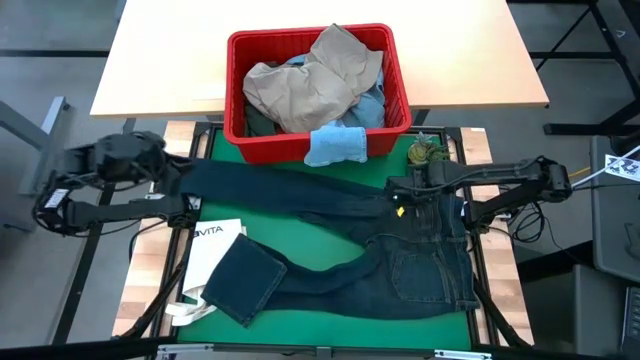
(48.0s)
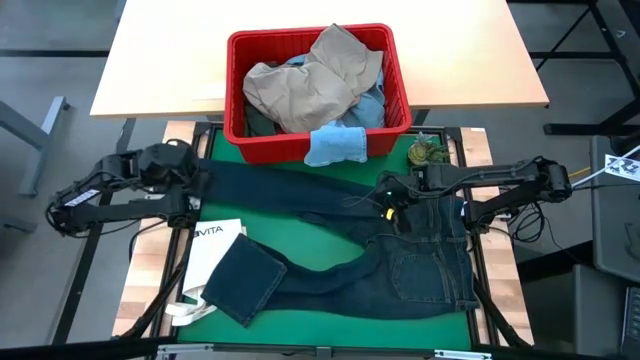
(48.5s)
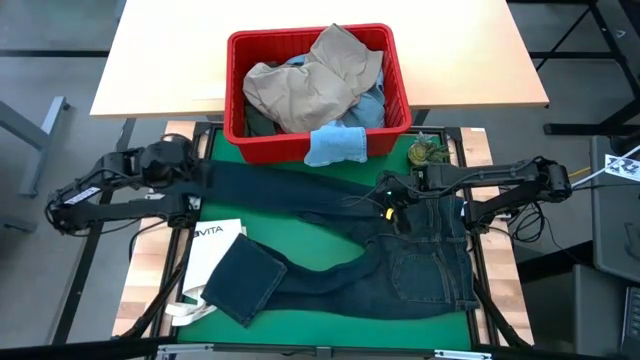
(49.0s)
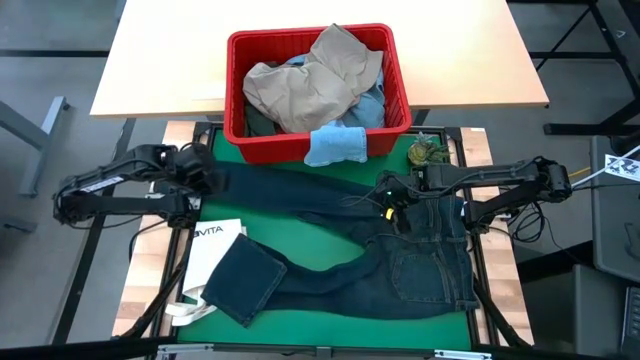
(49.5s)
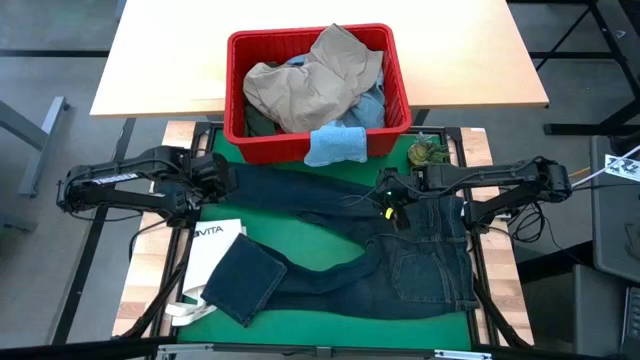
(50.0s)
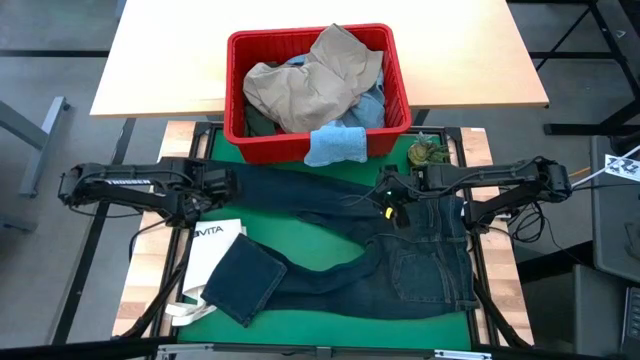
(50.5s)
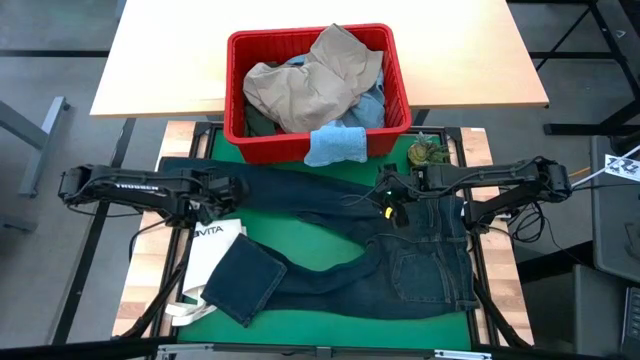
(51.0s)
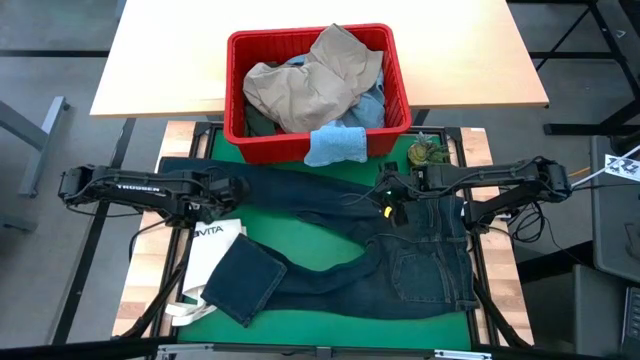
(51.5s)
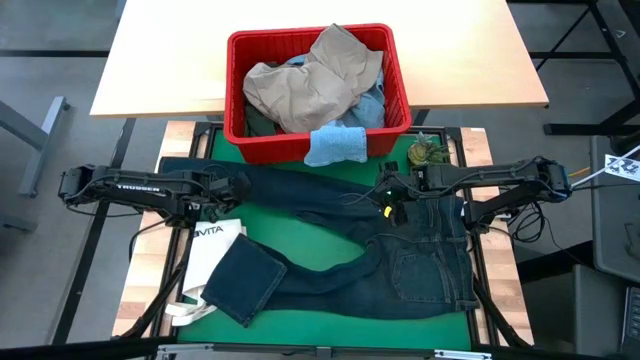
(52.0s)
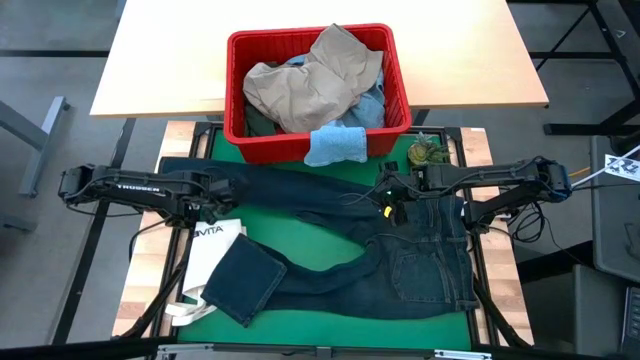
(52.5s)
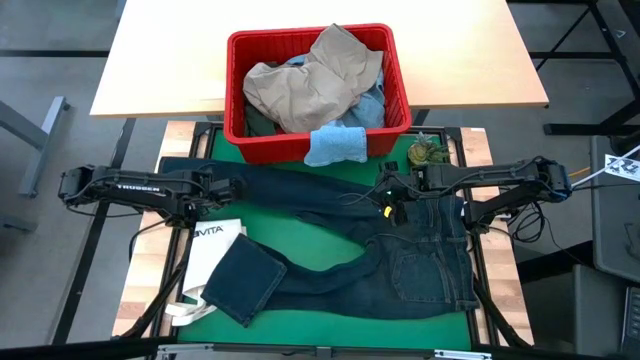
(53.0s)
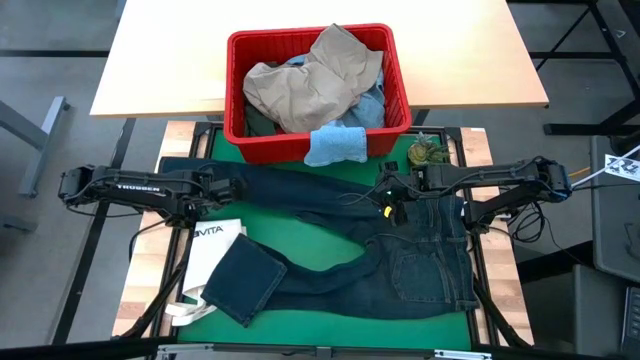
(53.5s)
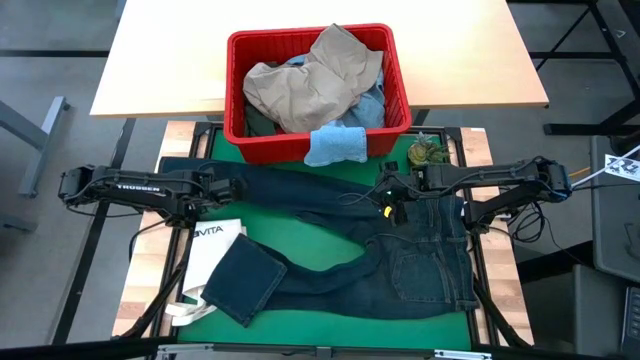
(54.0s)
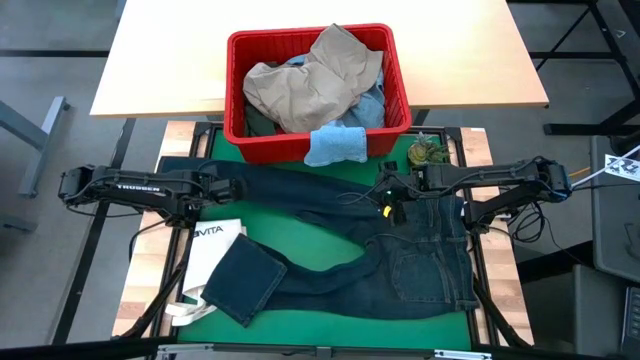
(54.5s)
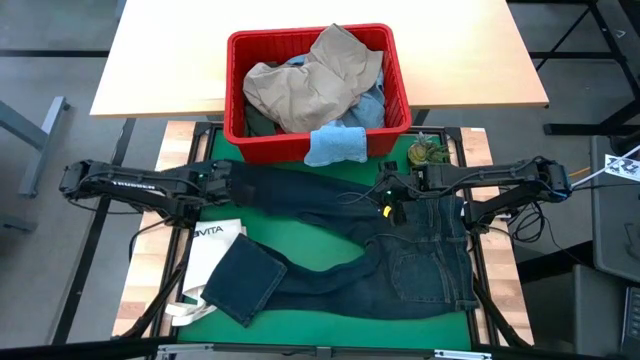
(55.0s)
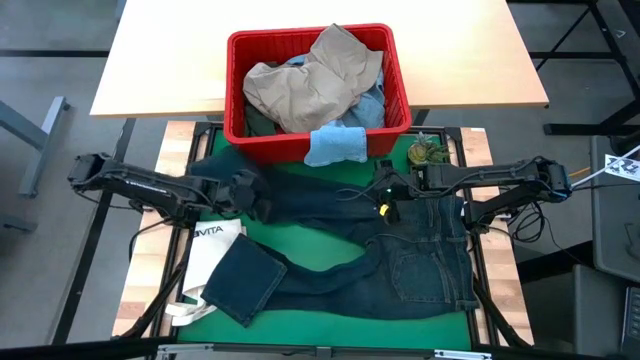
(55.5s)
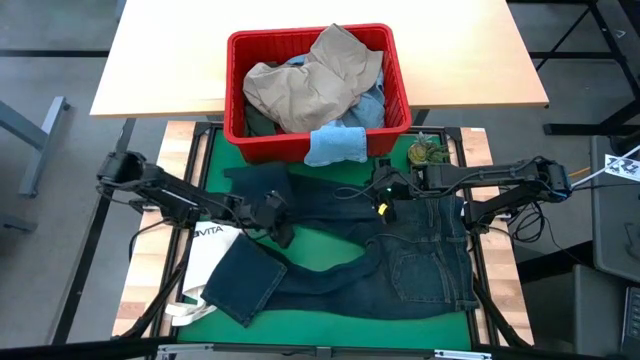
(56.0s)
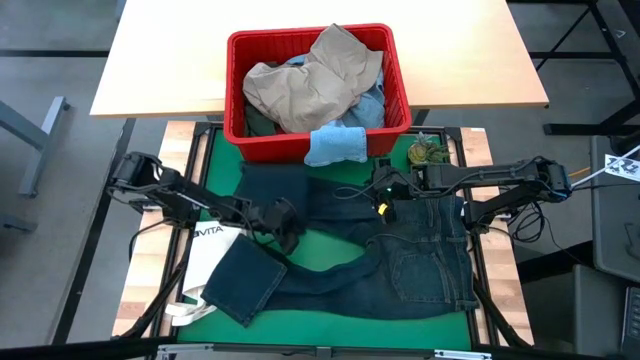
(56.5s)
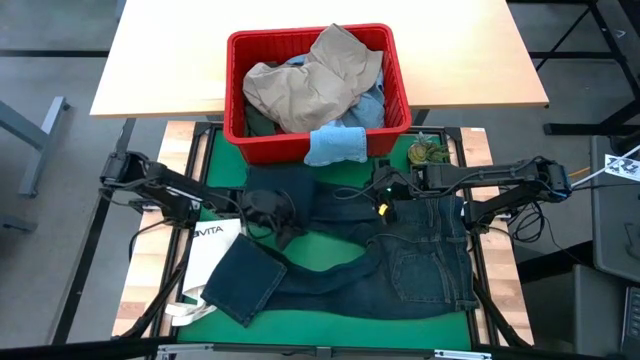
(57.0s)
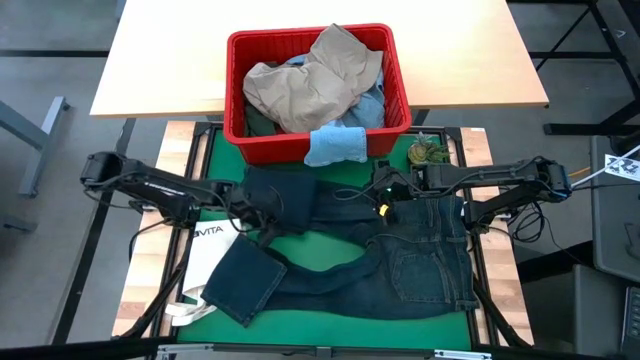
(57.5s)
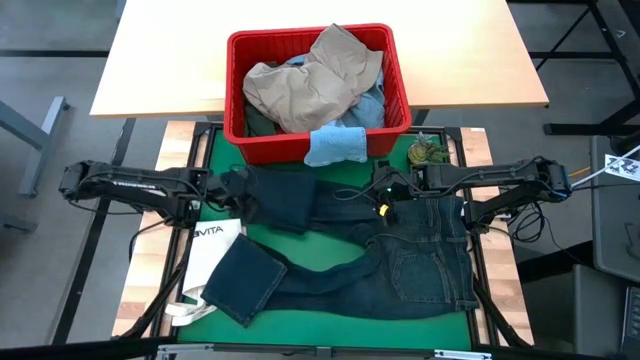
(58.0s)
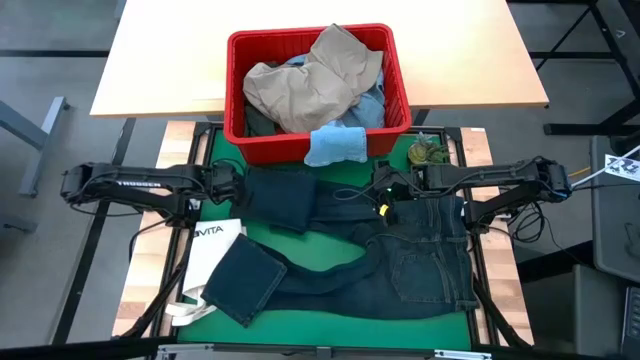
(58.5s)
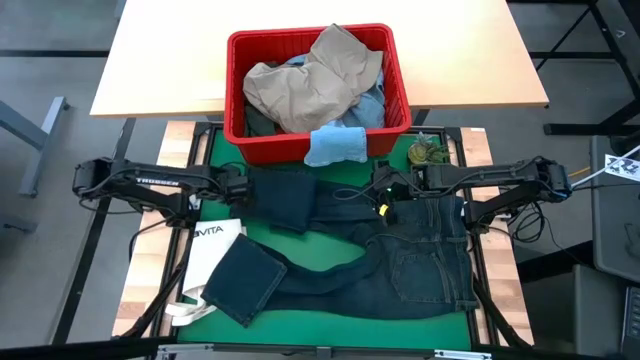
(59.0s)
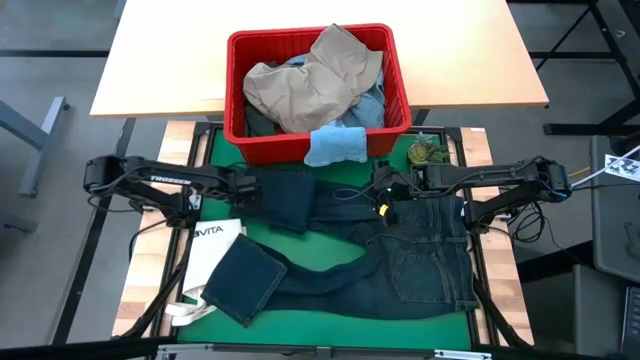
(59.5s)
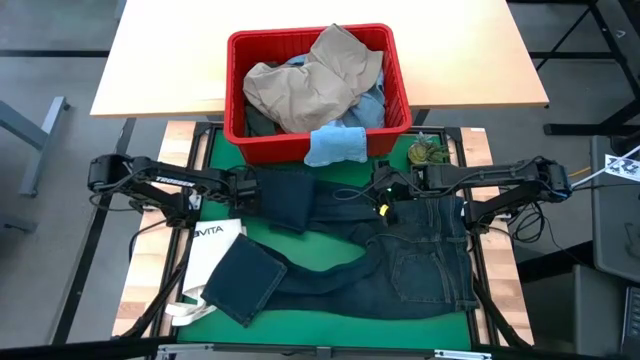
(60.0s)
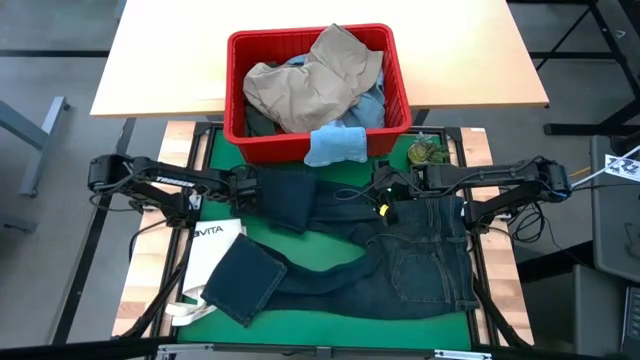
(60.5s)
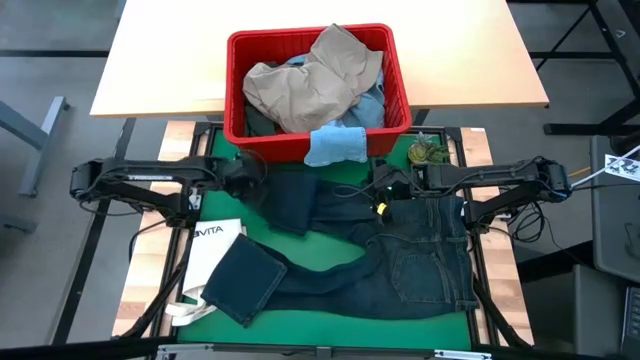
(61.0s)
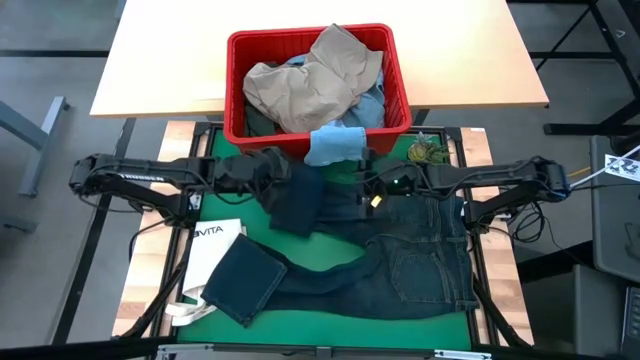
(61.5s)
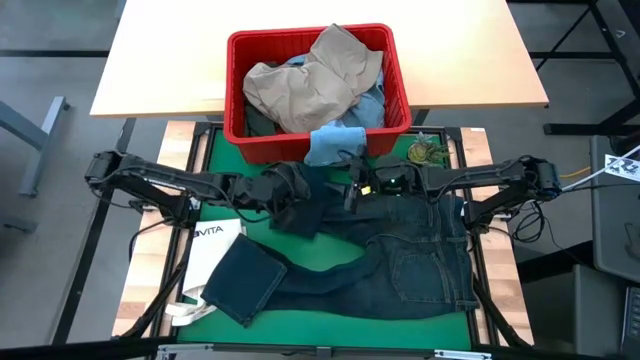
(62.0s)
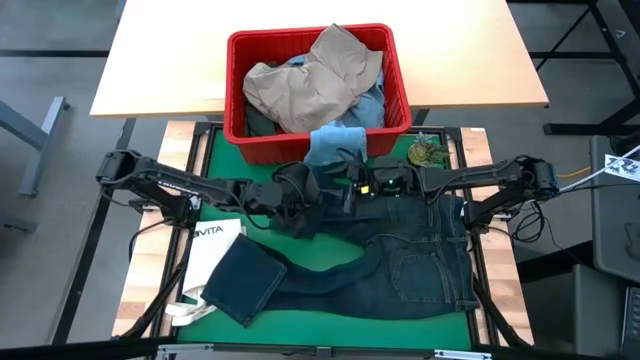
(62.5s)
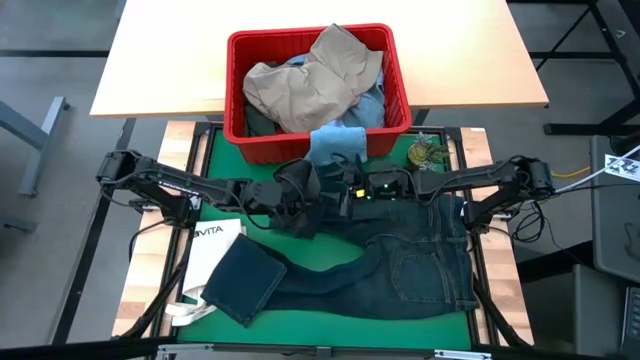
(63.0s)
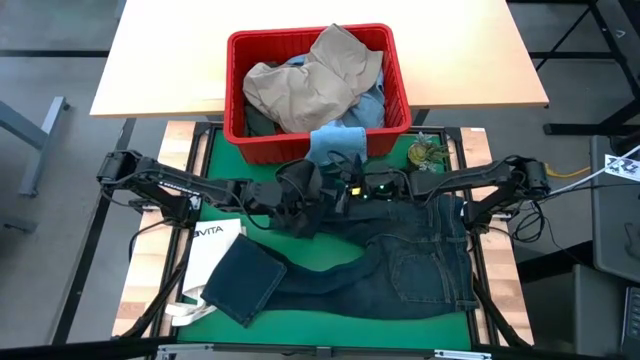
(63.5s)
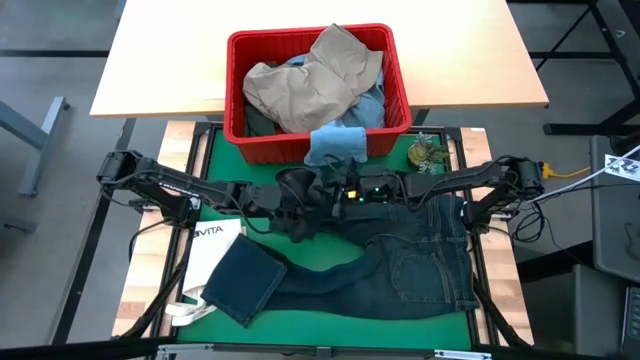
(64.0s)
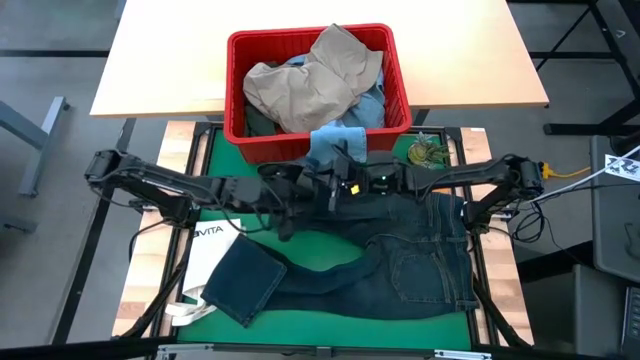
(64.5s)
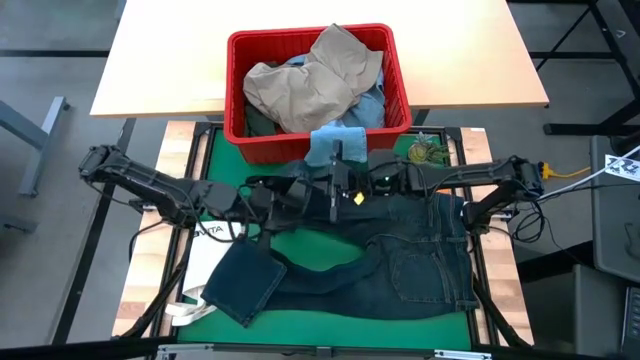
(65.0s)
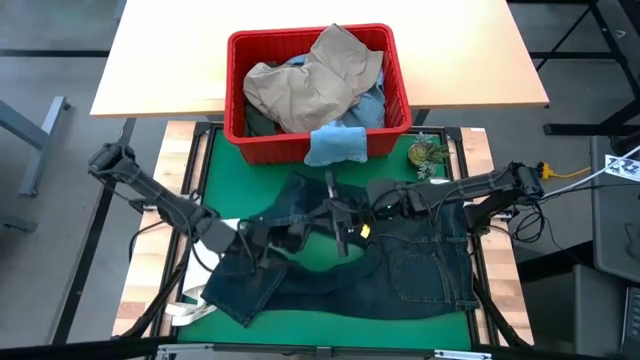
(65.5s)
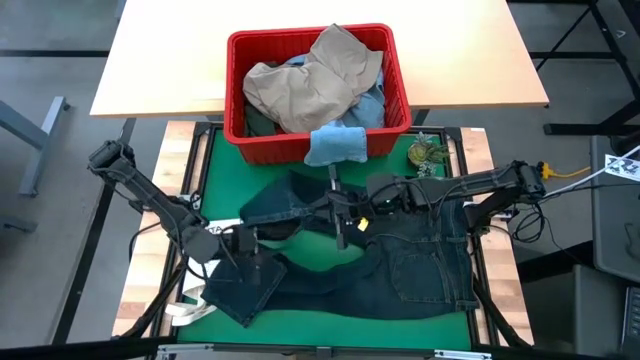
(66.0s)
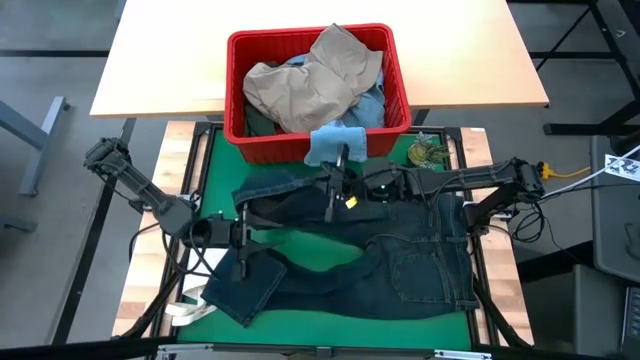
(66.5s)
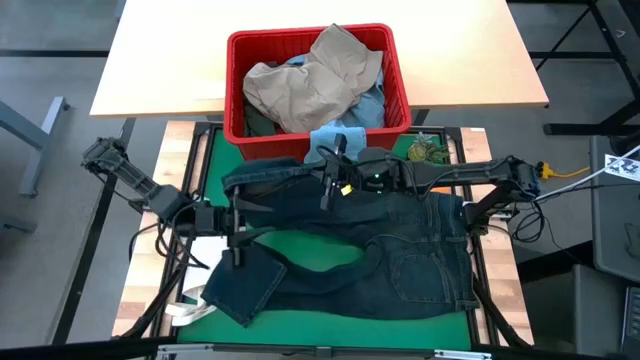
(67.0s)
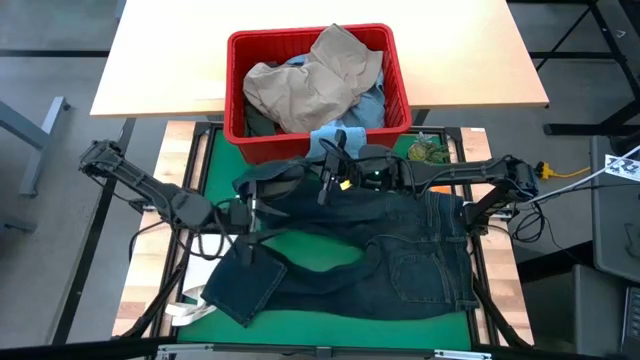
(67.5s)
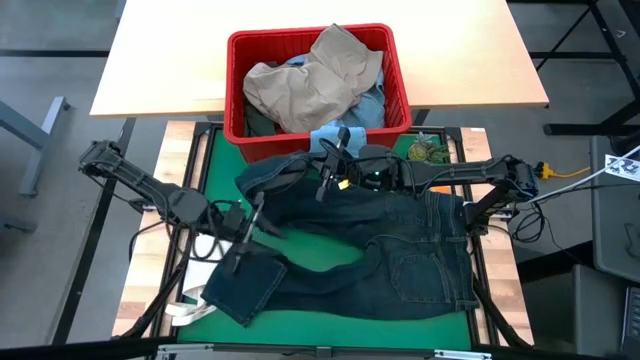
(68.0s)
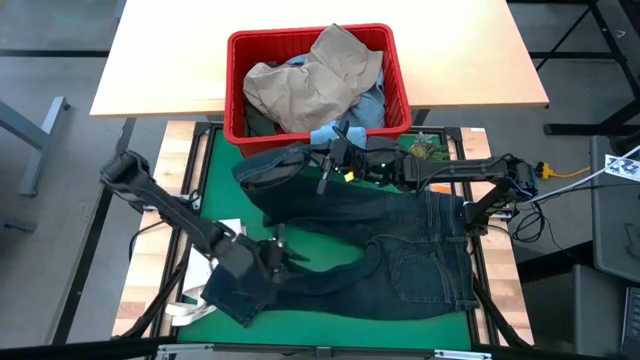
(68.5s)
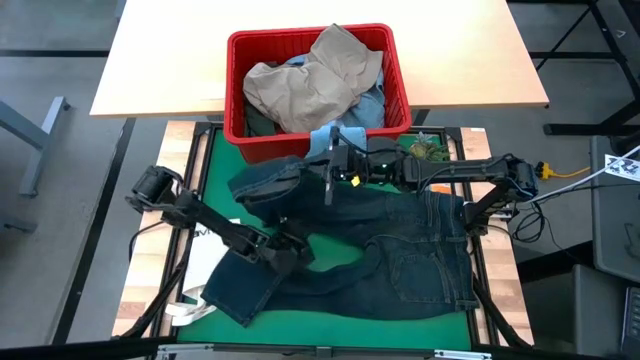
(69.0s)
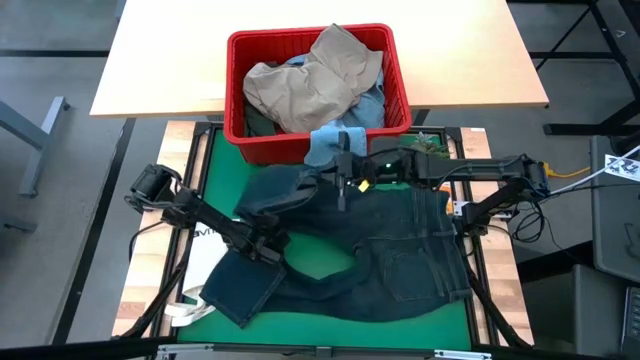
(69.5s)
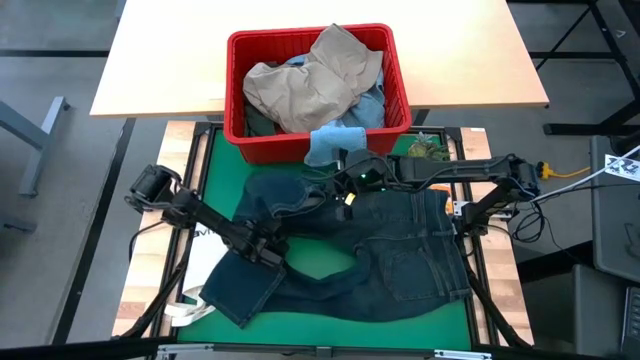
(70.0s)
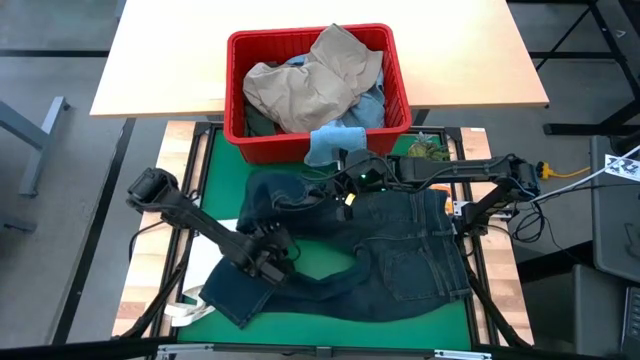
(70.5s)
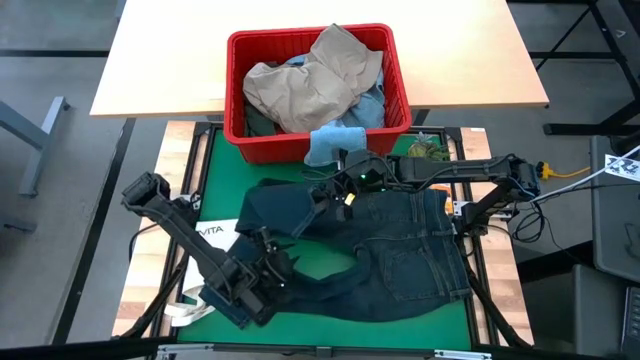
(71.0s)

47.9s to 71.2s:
Task: Fold Laundry from Bin
Fold the dark blue pants
